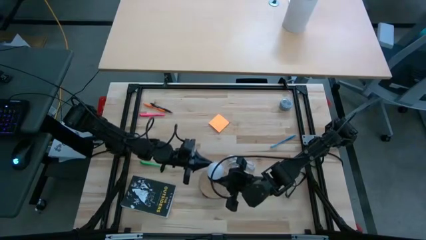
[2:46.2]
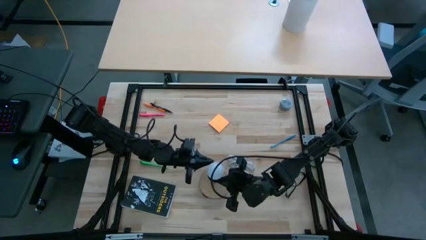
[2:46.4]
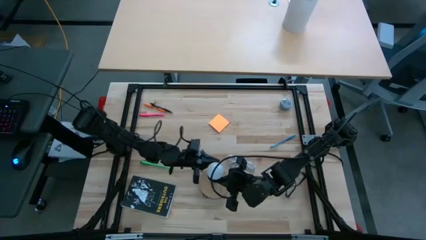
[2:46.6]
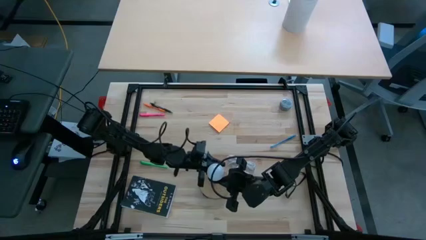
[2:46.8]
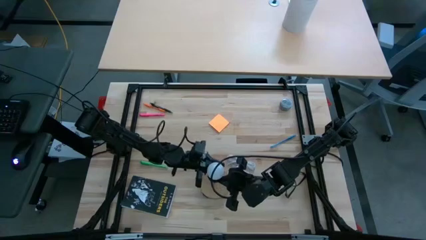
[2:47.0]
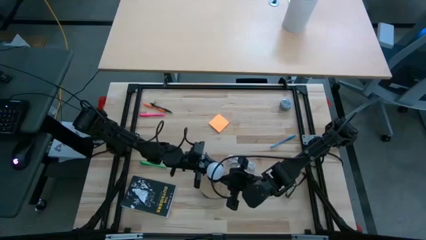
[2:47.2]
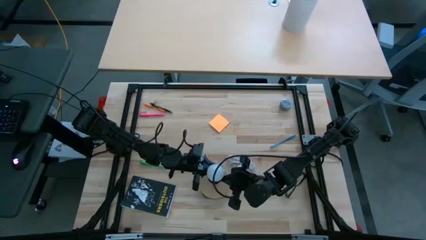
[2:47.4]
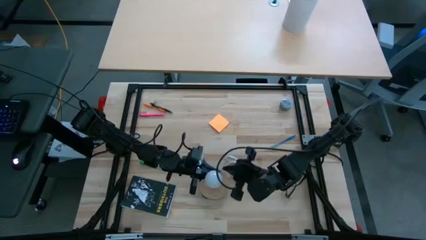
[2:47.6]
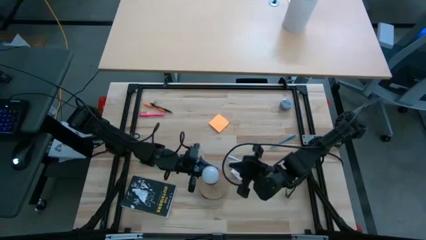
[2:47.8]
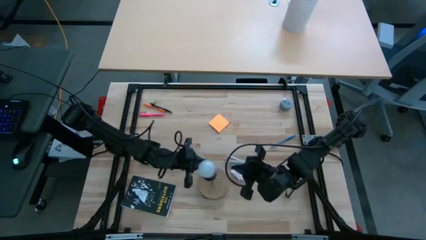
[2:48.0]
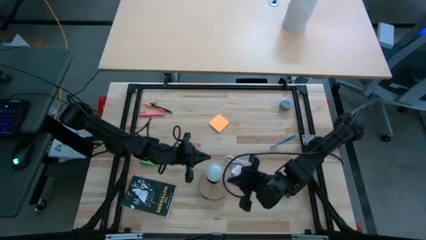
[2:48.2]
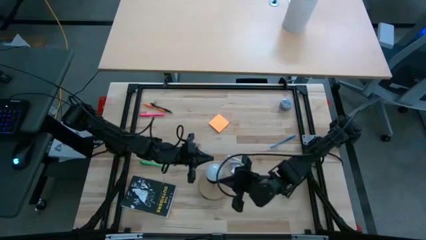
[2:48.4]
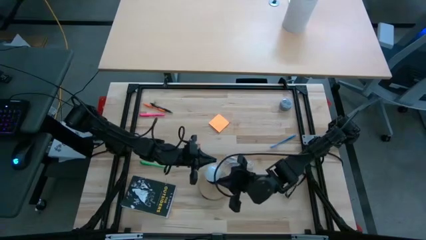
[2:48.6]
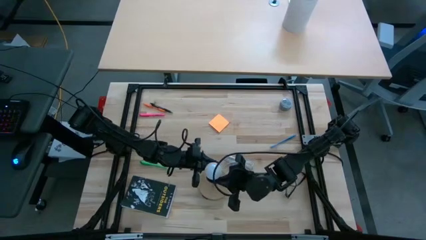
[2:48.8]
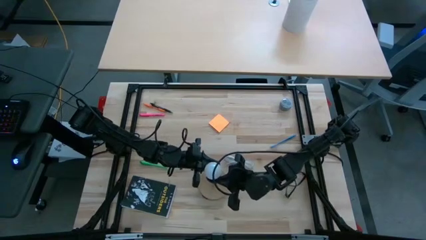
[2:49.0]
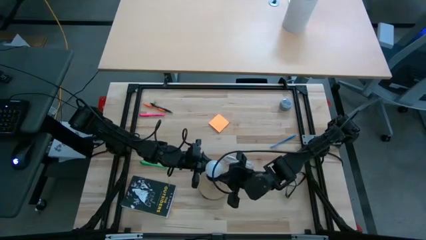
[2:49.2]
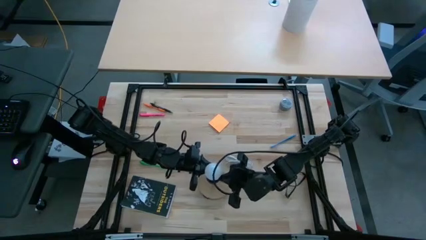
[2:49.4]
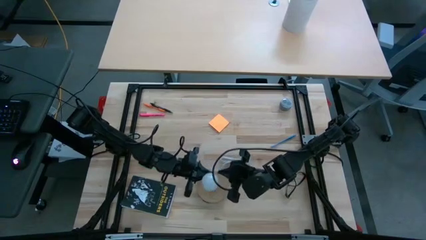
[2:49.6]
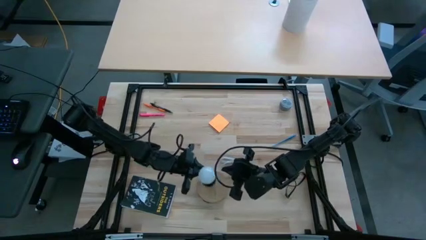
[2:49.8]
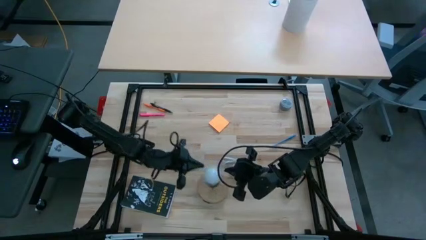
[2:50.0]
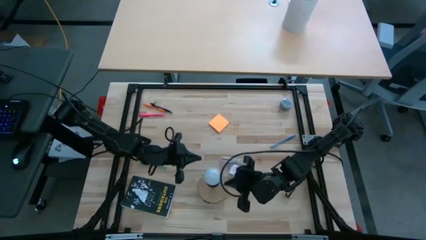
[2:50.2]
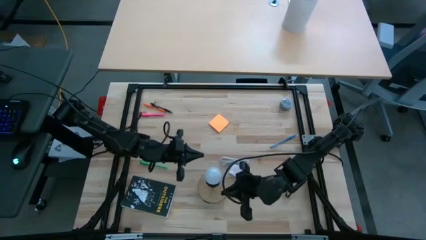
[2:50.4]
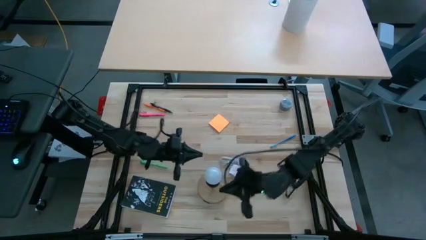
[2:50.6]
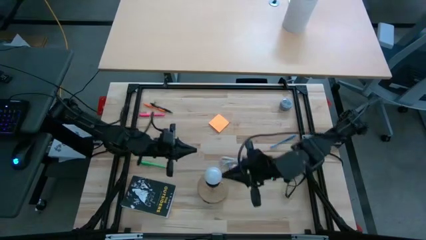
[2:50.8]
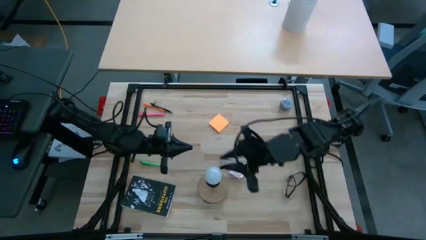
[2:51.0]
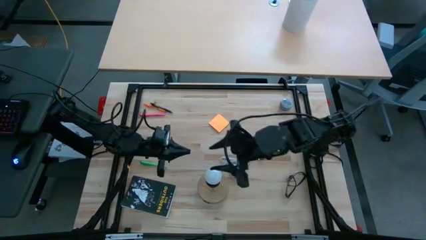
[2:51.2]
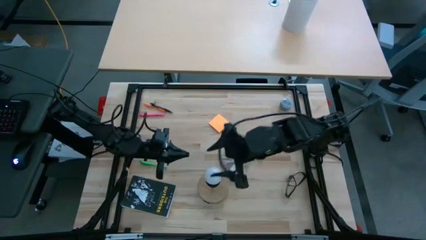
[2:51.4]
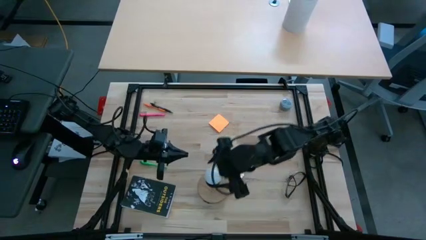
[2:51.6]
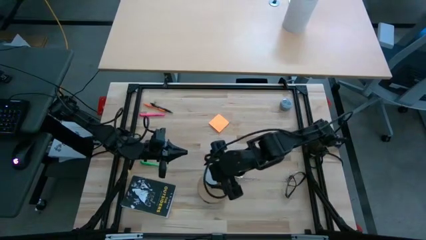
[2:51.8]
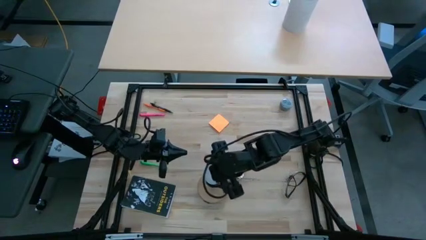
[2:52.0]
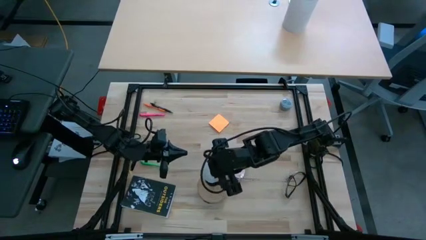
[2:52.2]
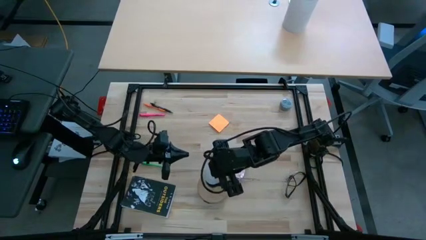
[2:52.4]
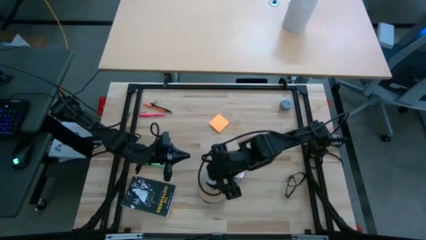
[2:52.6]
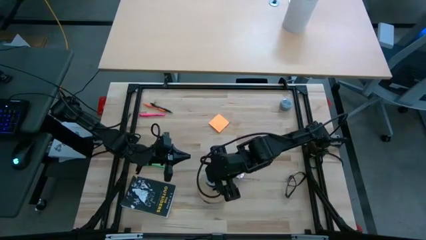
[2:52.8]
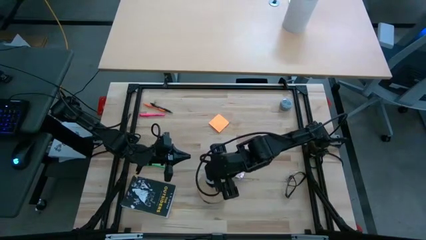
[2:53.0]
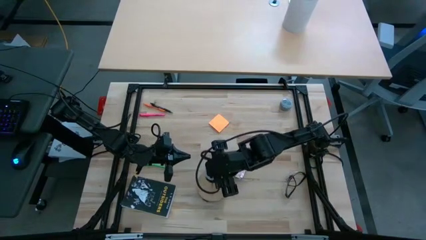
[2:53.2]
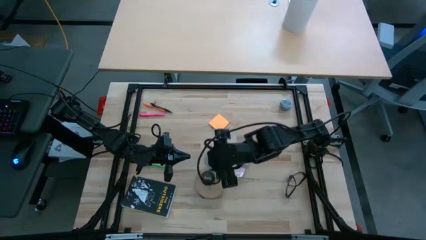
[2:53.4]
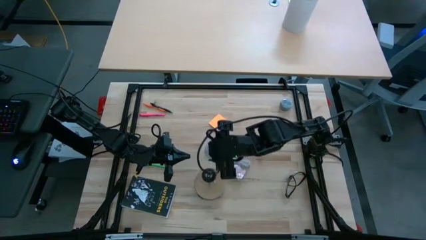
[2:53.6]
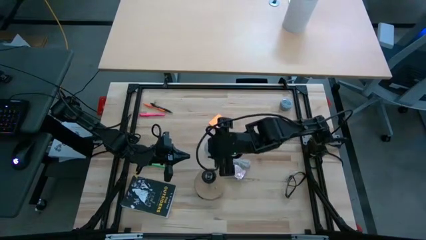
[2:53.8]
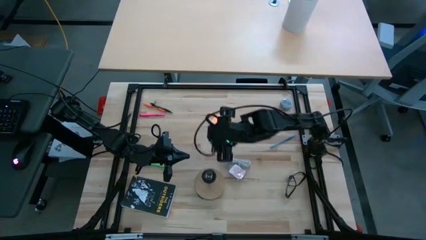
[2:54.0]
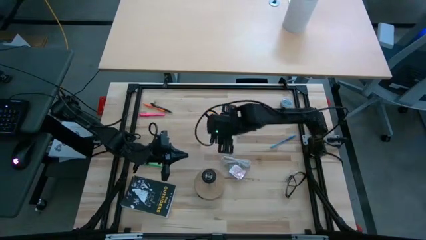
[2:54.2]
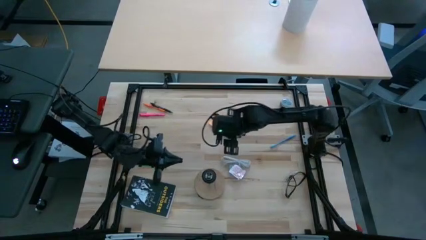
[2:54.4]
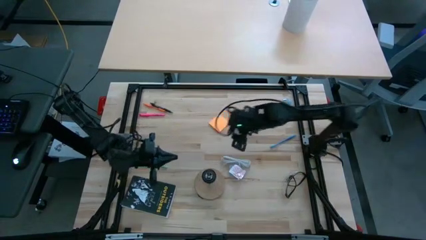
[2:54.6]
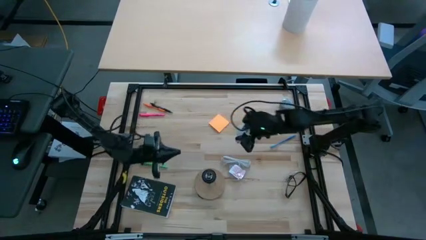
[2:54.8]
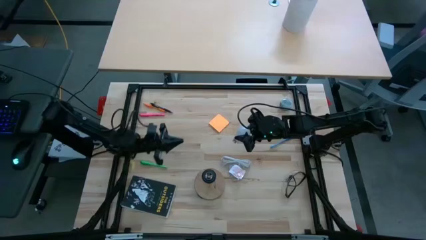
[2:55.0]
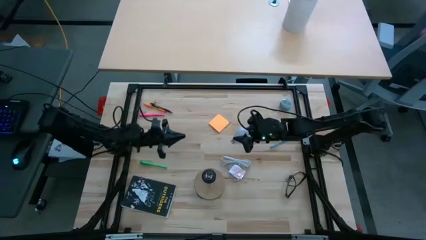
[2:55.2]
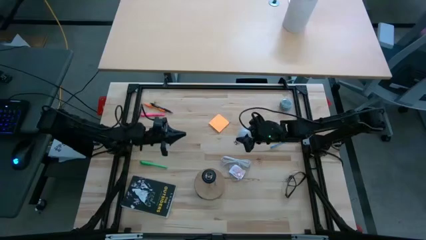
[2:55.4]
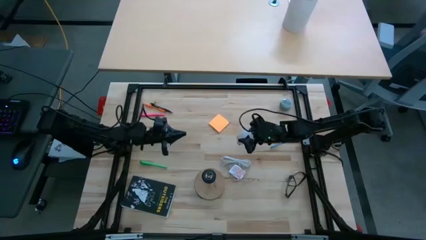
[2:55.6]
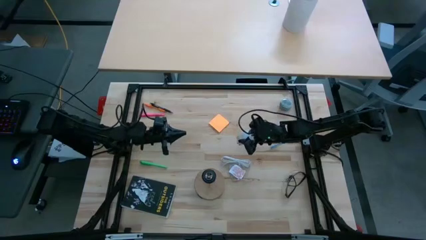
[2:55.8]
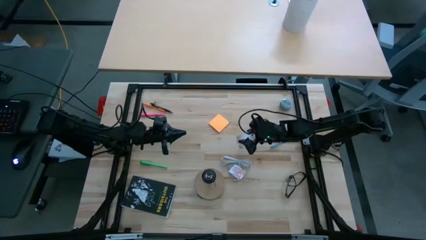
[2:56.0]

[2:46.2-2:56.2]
Task: Screw lightbulb
Remove the white lightbulb from the lamp
